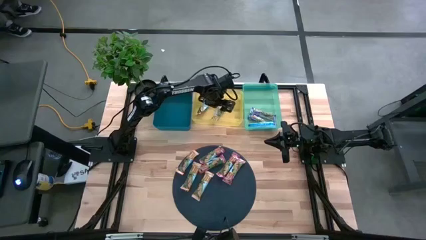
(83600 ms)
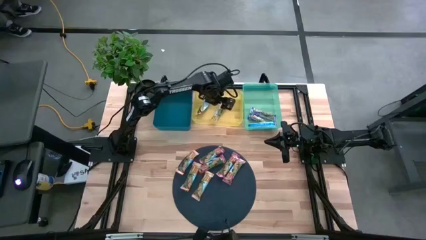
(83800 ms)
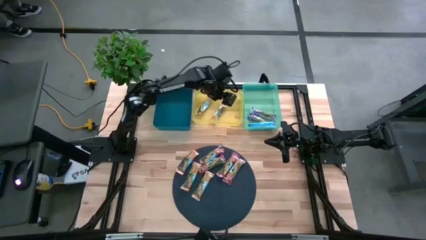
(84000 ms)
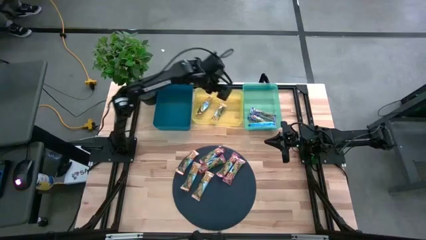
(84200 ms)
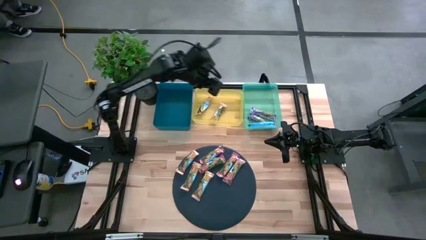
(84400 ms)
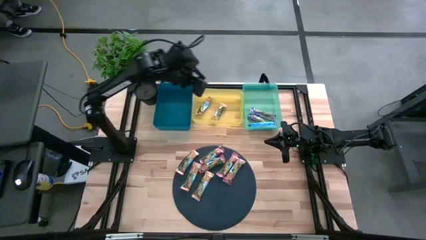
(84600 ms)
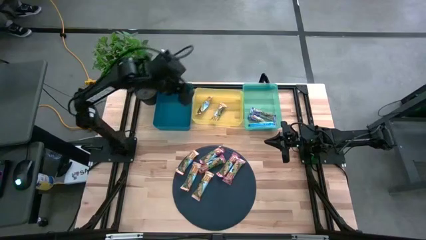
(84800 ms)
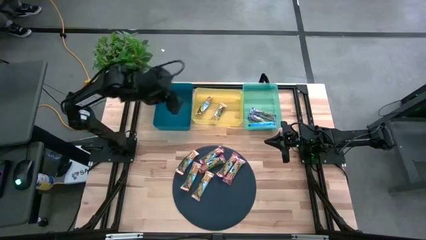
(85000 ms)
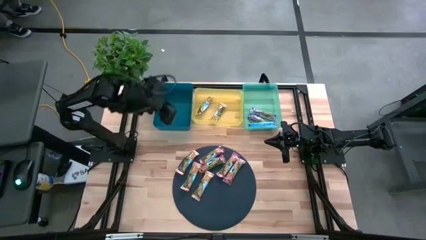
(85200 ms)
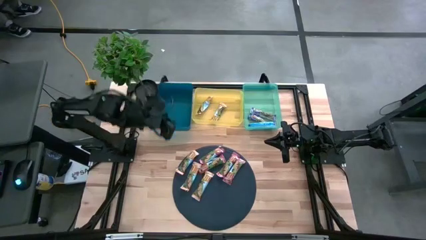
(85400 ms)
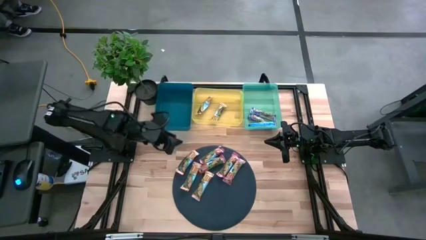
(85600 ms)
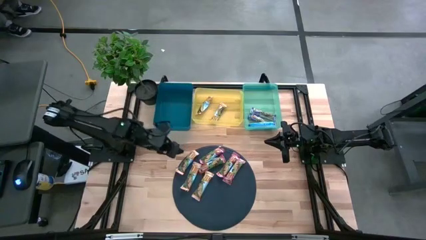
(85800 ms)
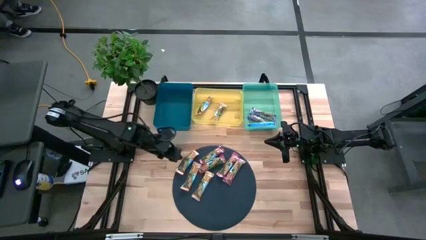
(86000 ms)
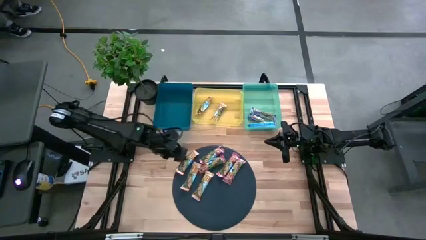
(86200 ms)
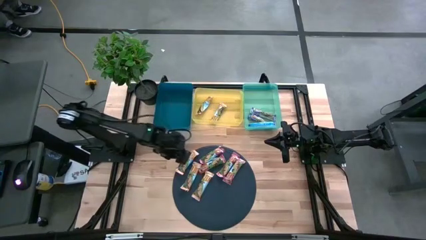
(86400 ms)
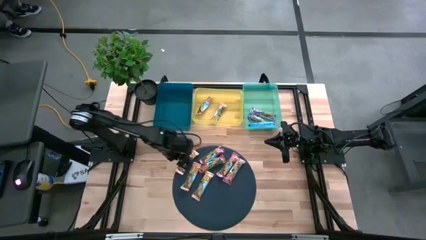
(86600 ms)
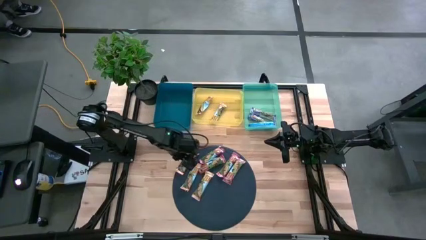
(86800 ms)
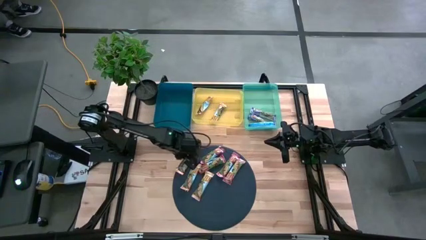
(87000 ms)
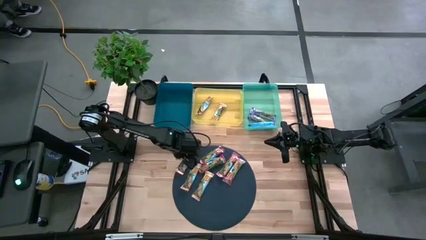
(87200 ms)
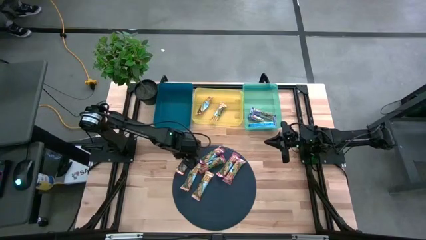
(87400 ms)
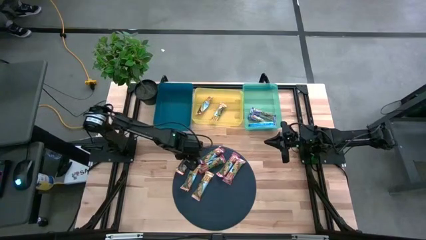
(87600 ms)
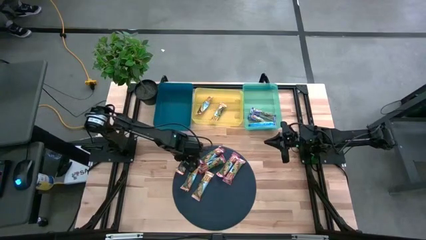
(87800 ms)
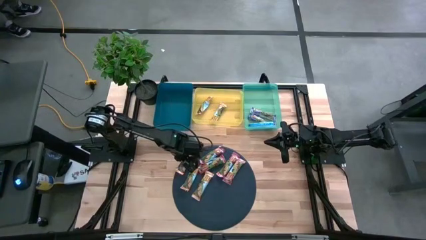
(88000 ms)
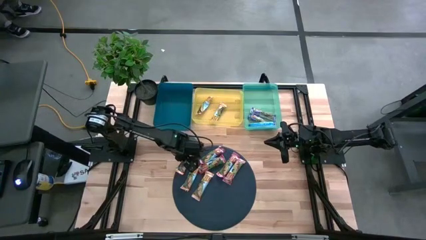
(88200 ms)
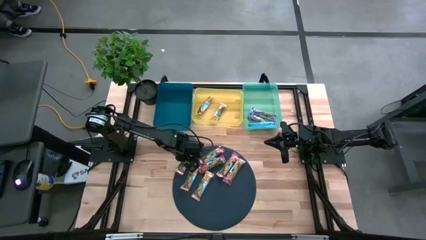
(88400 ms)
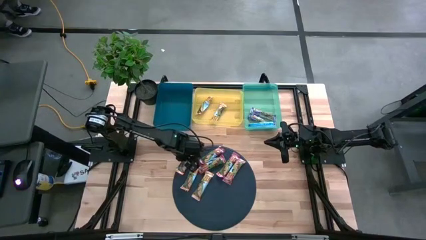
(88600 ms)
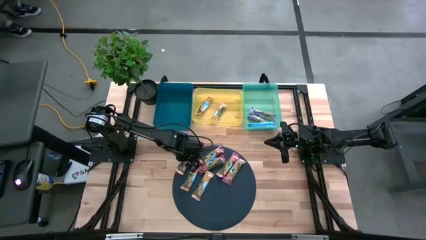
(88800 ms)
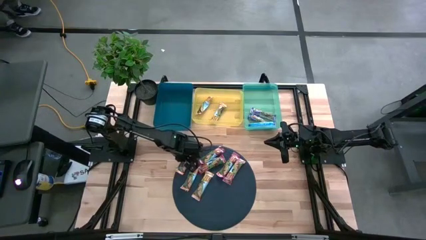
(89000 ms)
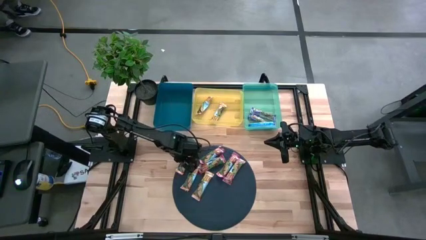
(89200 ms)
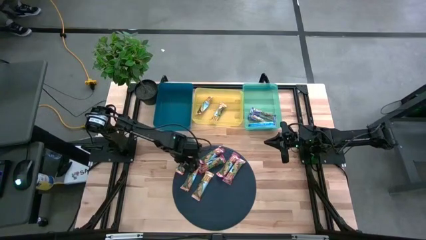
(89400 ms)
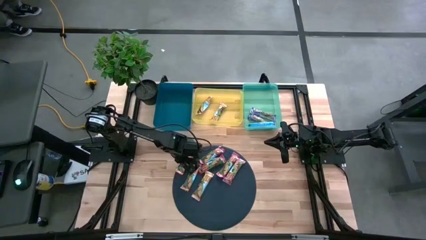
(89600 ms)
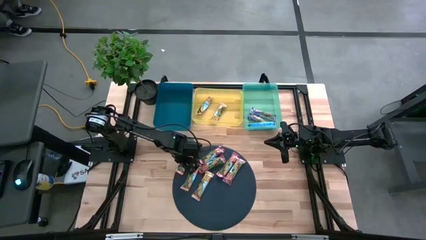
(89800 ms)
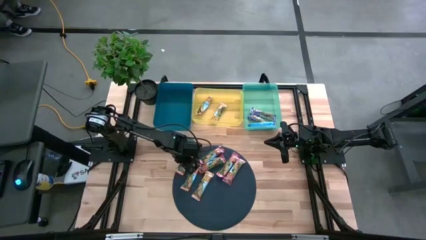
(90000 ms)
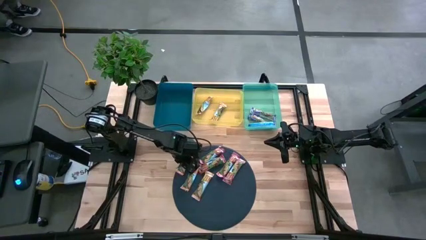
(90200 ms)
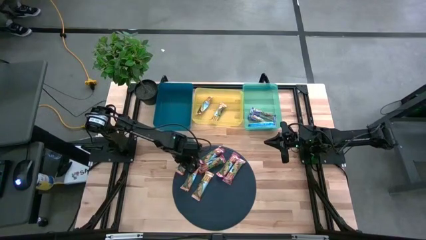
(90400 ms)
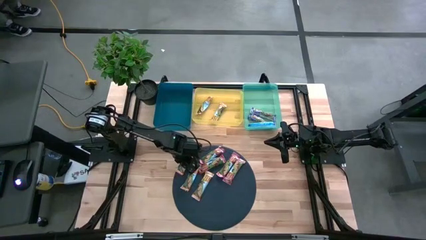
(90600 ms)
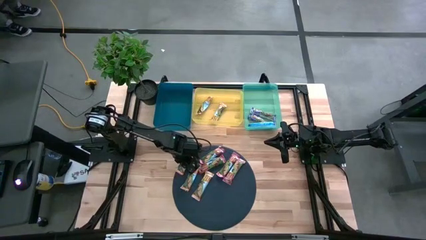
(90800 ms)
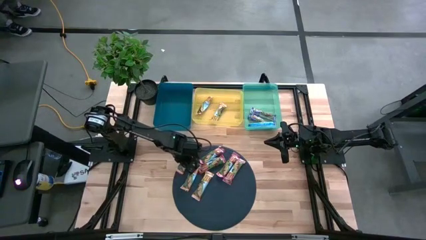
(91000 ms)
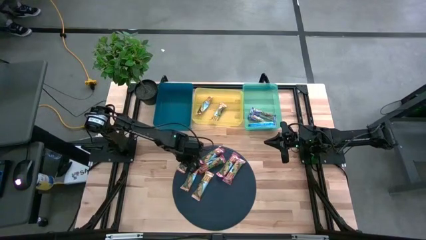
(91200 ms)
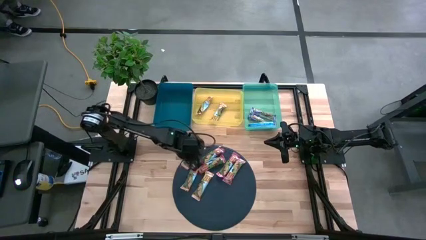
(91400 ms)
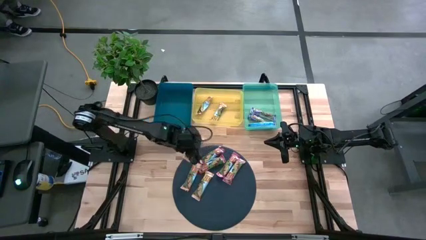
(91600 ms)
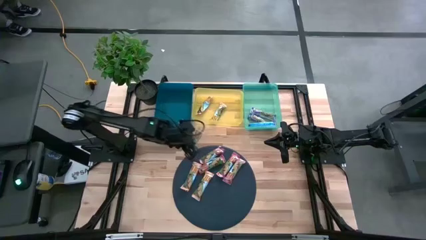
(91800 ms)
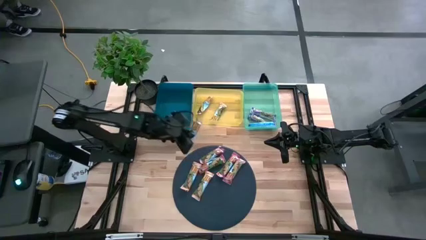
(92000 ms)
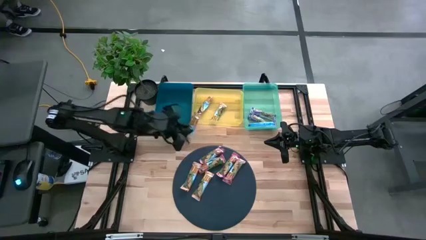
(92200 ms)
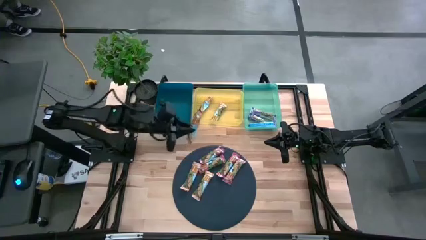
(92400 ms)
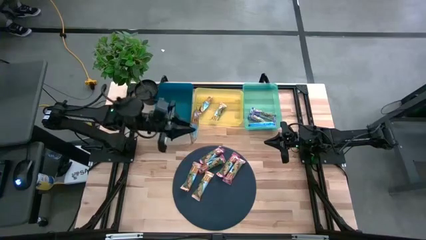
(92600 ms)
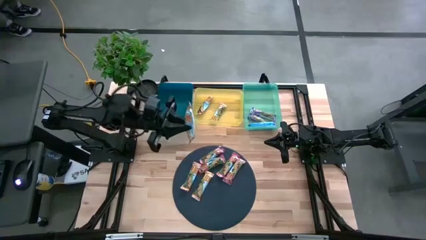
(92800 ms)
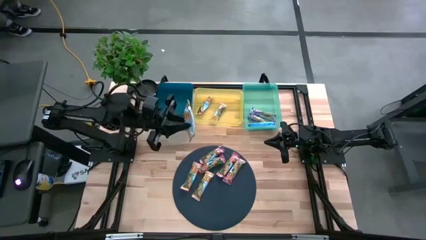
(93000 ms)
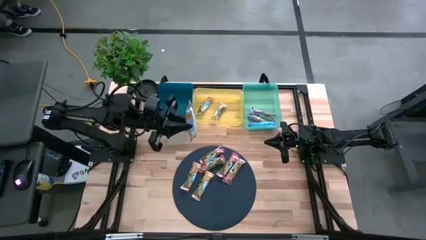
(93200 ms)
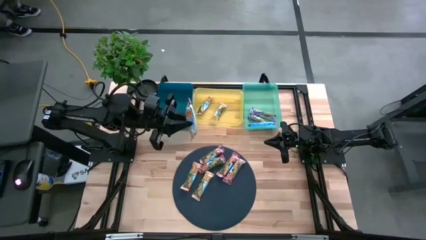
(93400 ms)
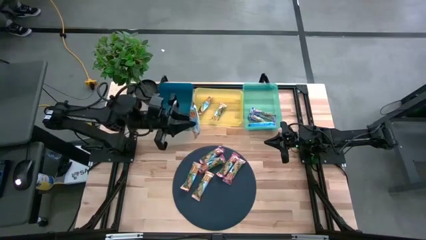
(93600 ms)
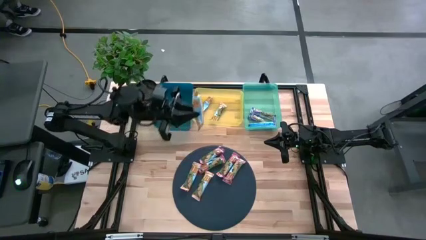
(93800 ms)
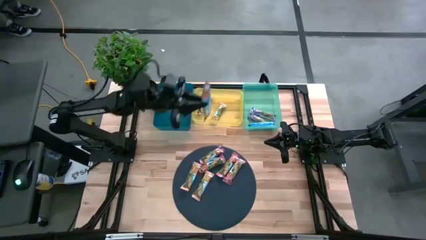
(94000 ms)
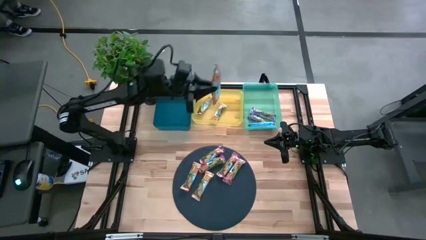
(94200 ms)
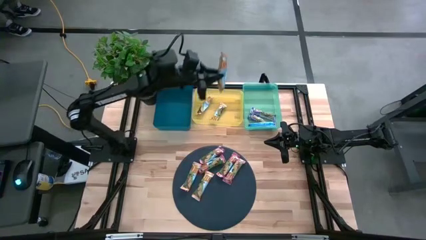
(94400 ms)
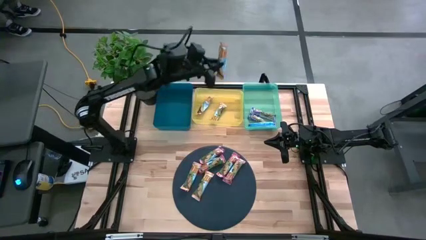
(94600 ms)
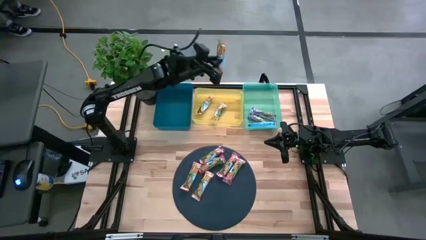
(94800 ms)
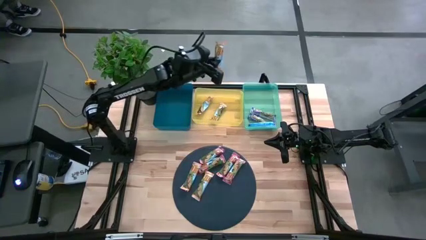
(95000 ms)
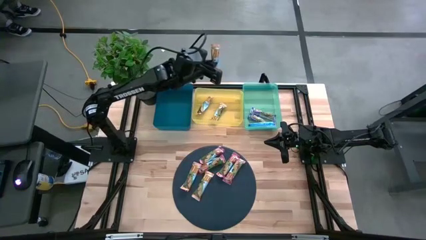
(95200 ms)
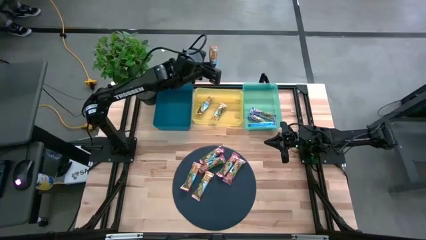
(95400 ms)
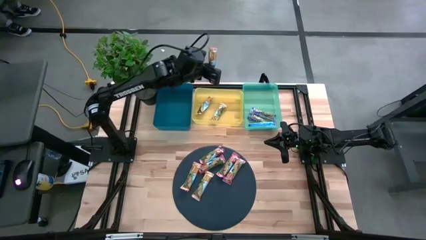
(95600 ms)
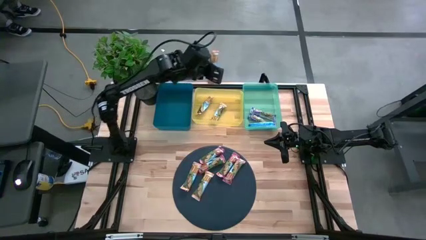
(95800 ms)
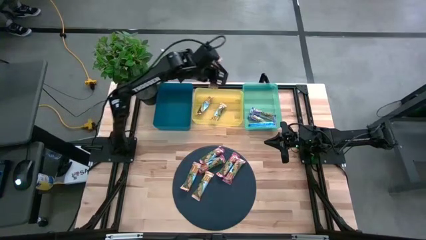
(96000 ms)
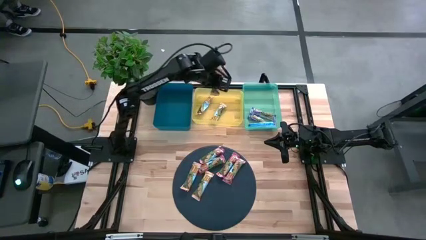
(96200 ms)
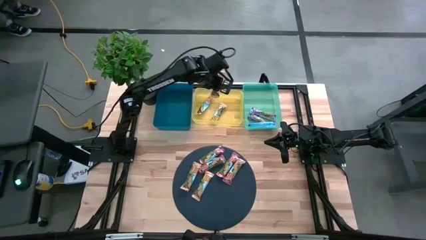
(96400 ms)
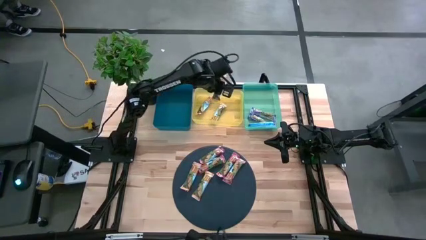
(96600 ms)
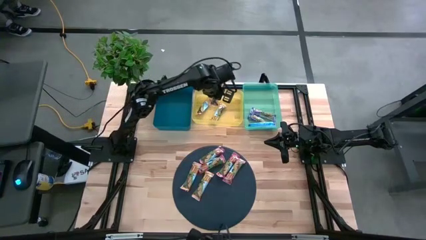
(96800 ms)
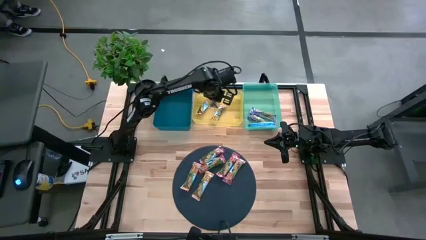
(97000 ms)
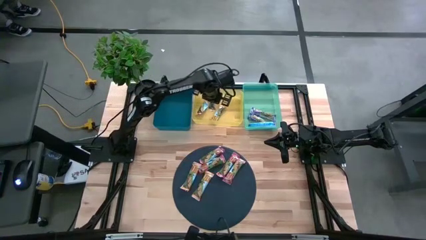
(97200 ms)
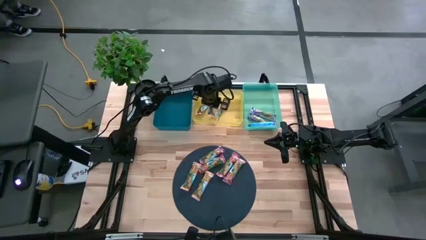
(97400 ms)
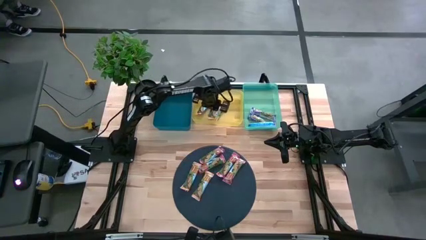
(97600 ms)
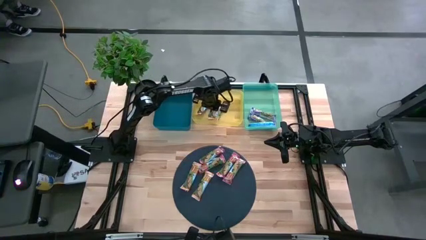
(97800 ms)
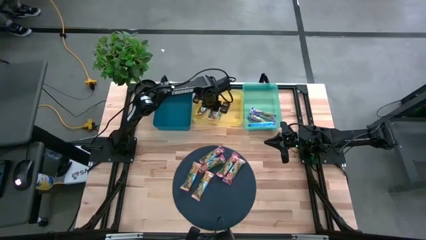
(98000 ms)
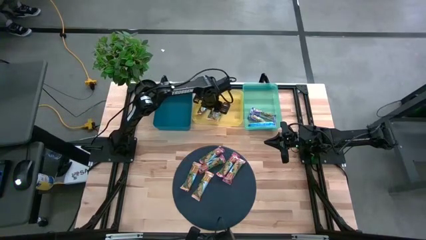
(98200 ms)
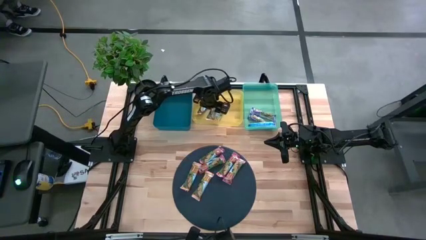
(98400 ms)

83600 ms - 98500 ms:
Task: Pick and place Granola Bars by type
Put the yellow granola bar into the yellow bin
